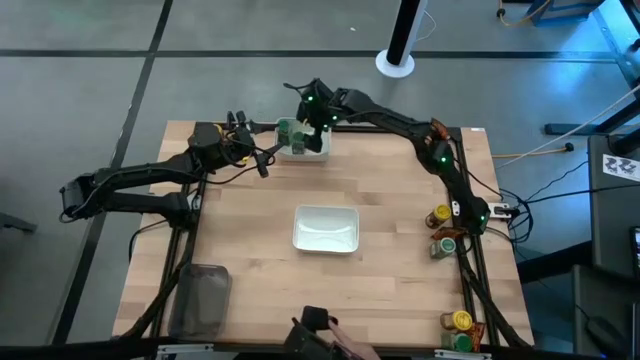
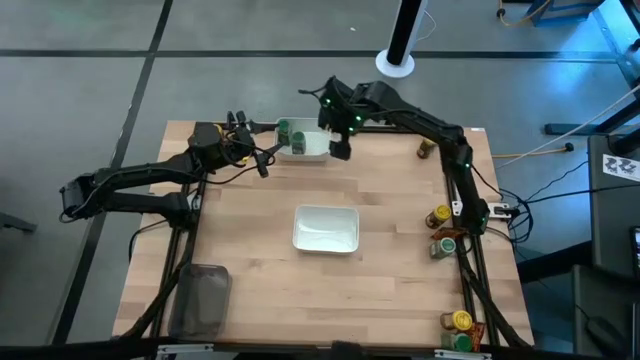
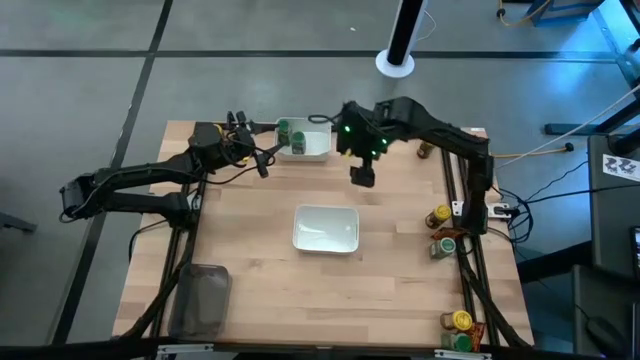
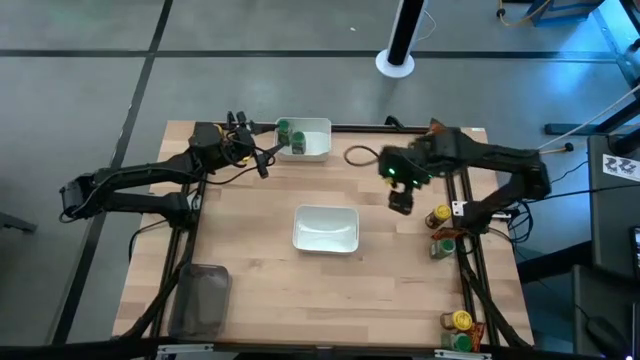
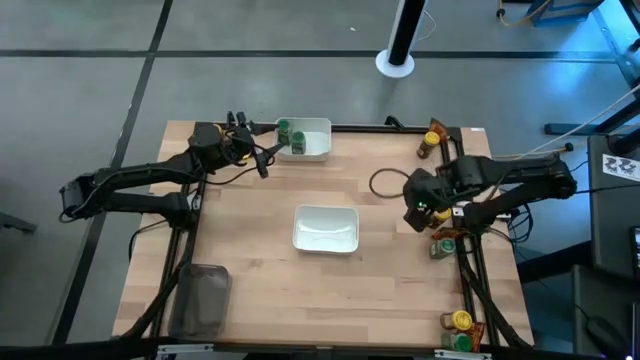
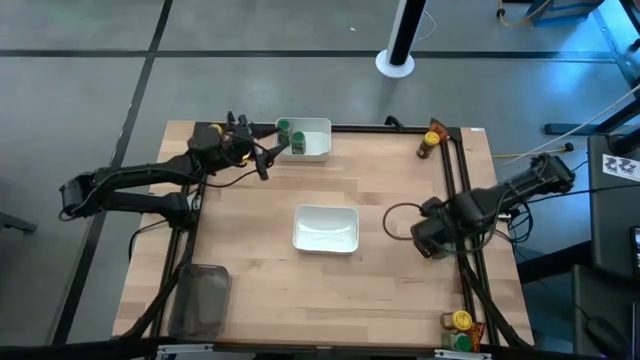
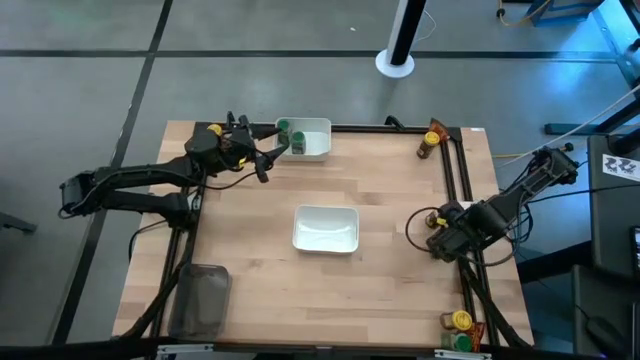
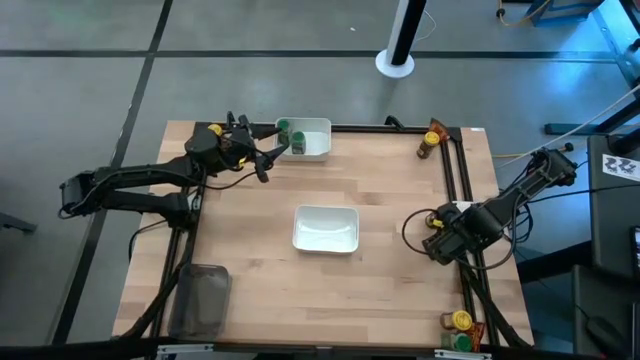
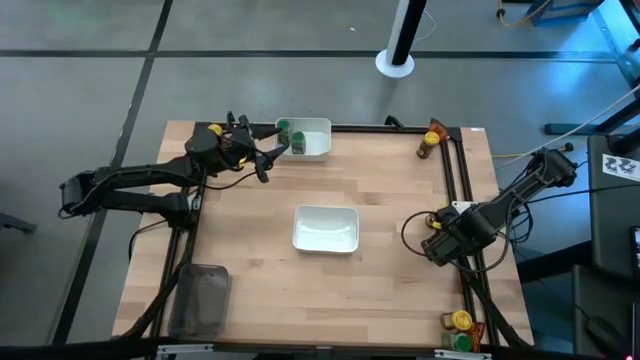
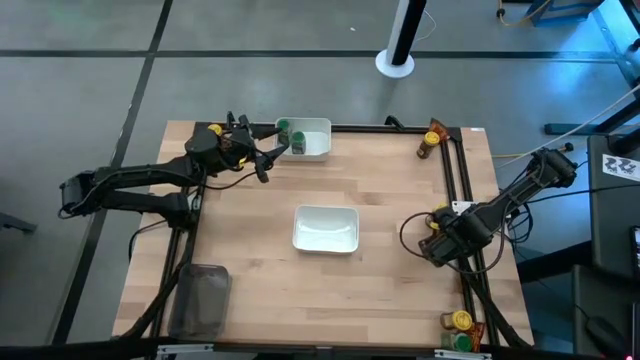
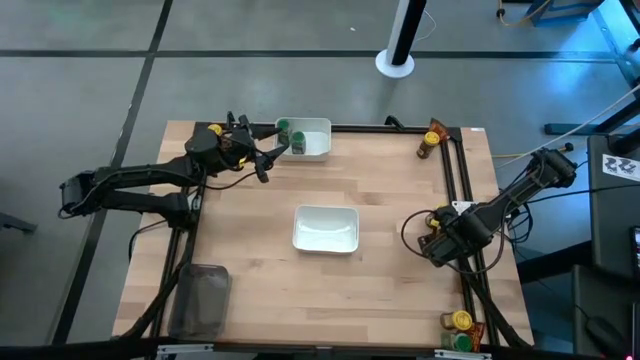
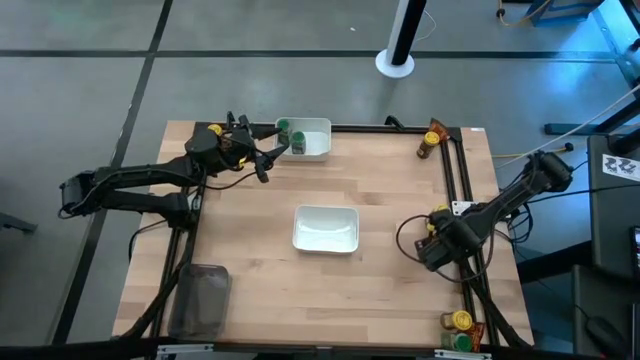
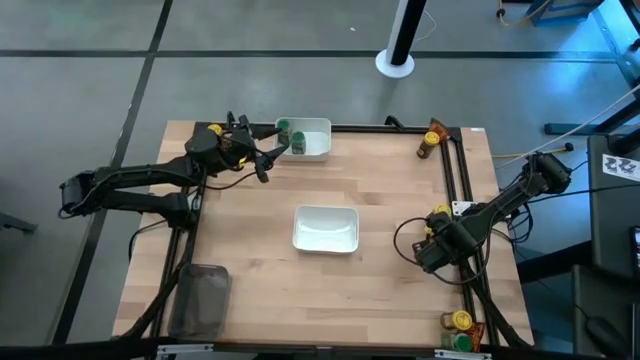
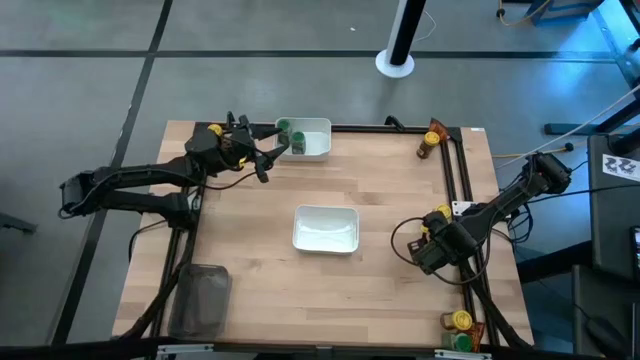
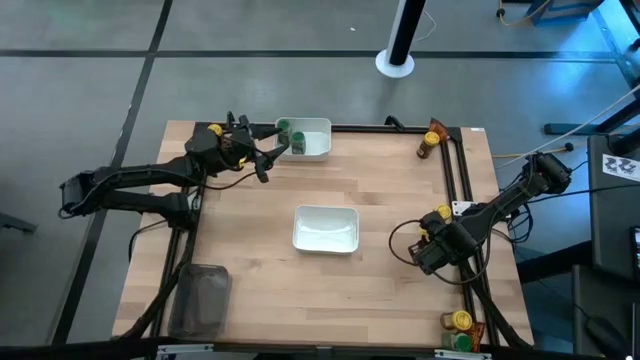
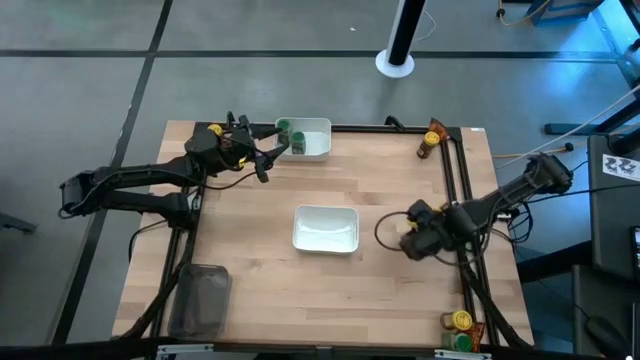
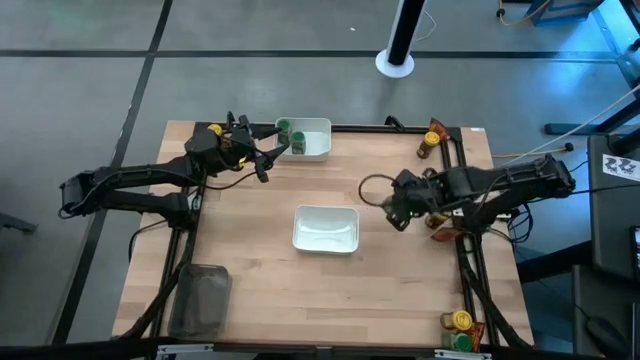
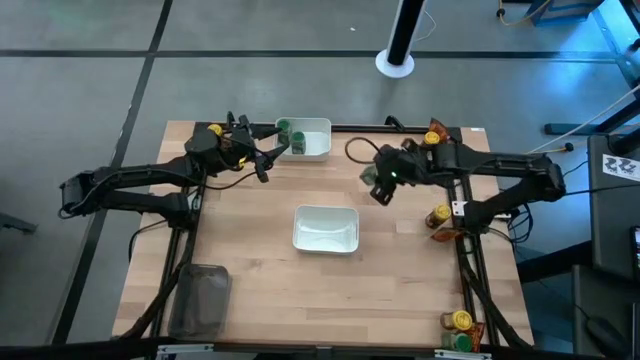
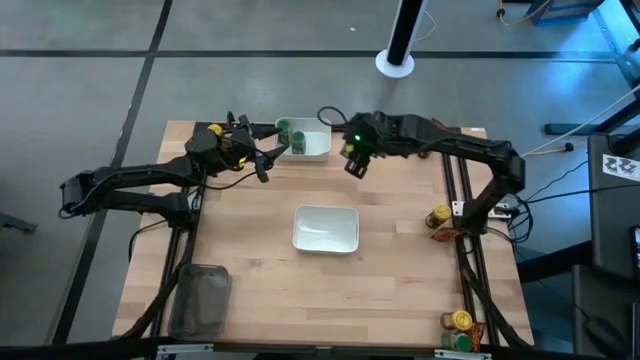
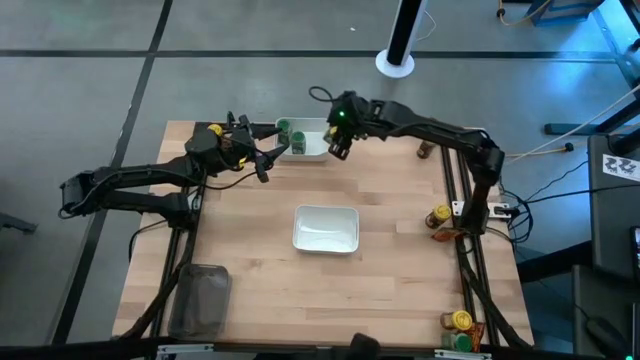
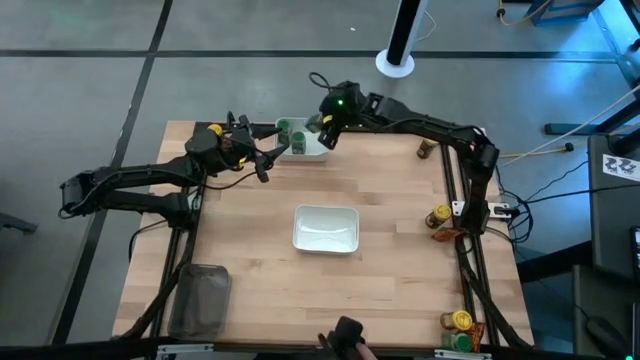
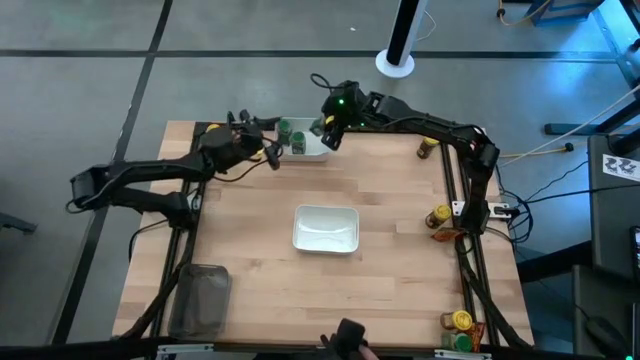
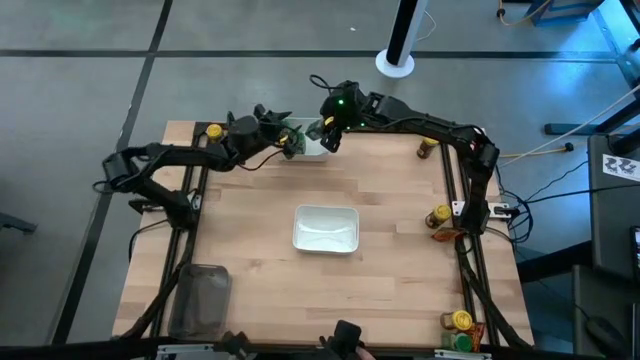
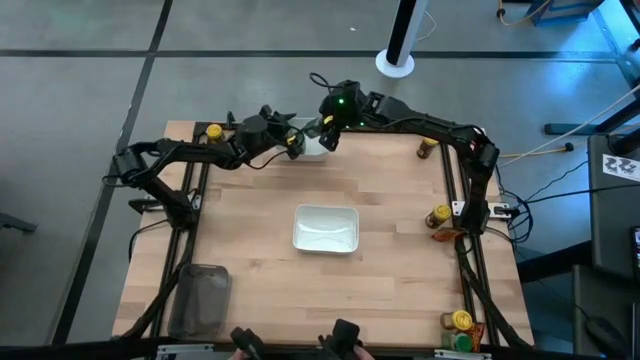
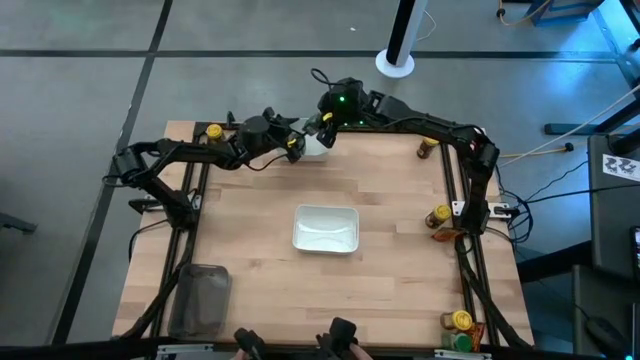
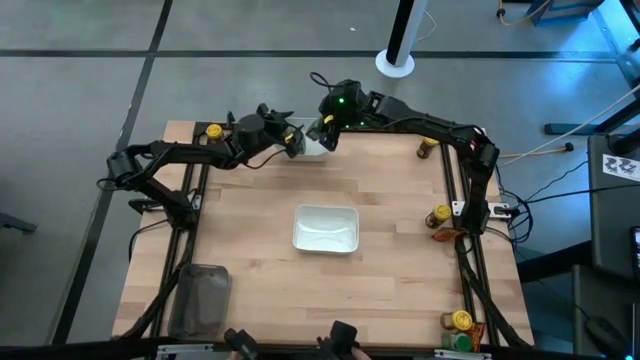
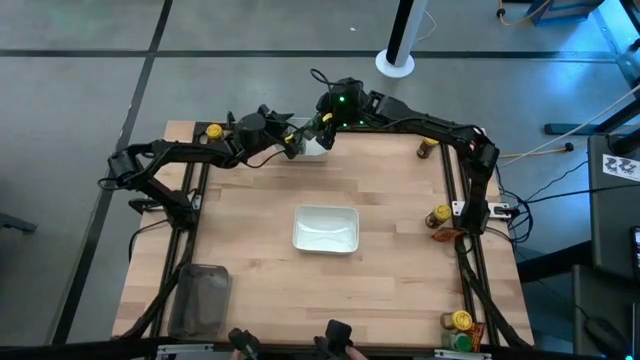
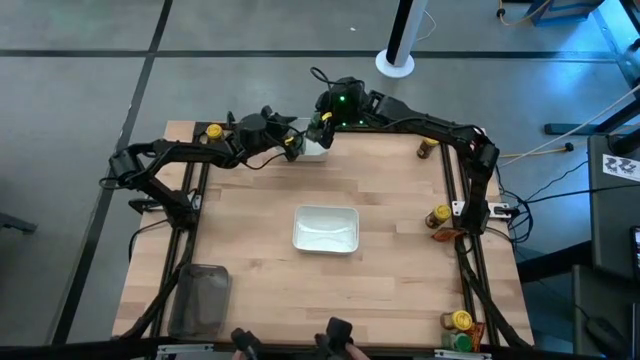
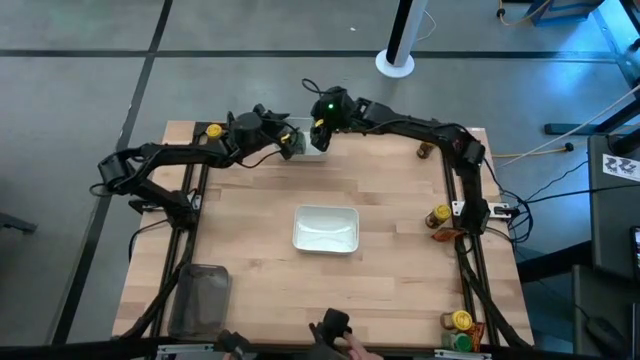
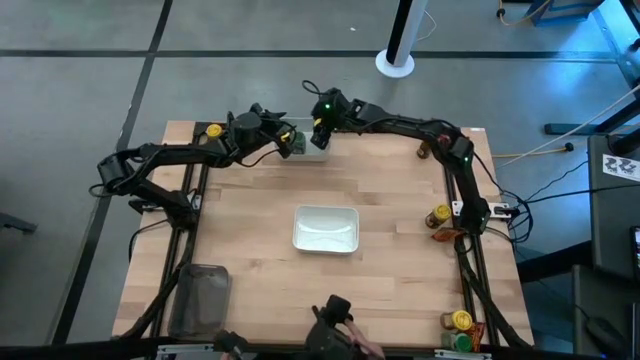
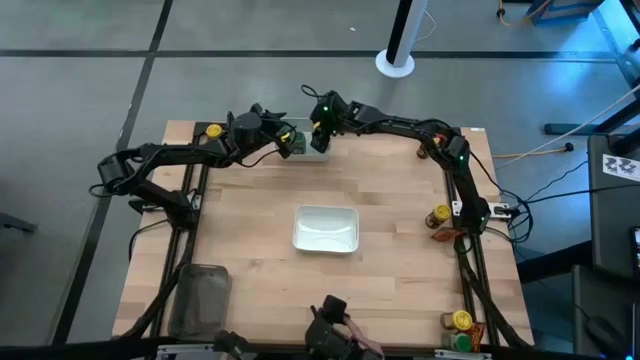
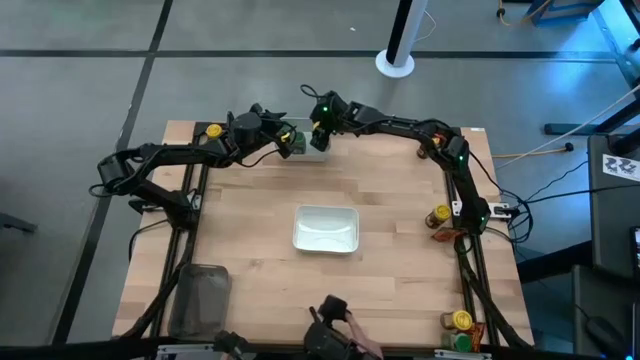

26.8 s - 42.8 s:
Task: Sort spices by type
Put the top green seasoning bottle into the top white bin

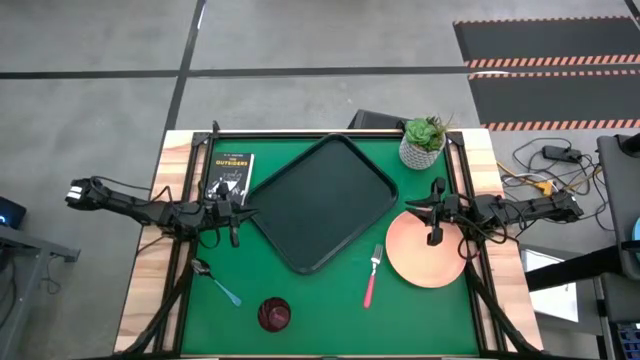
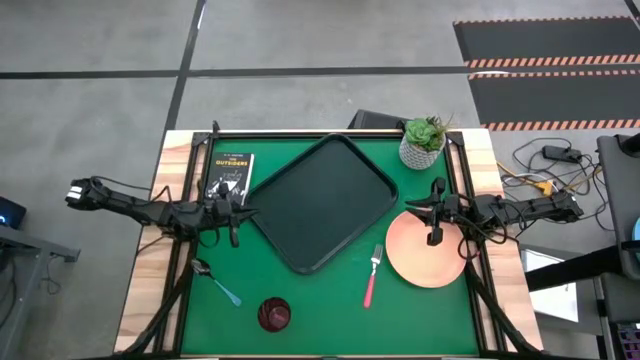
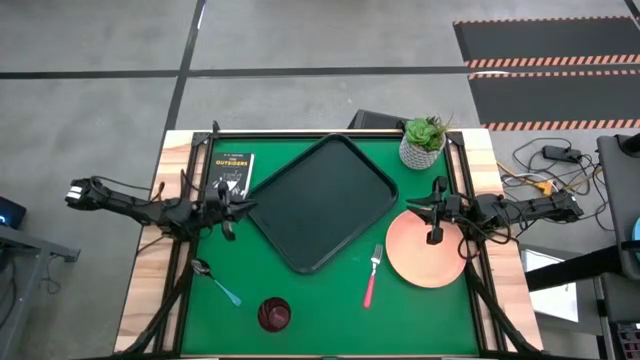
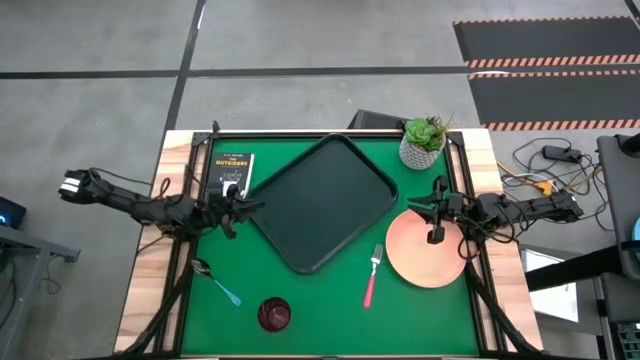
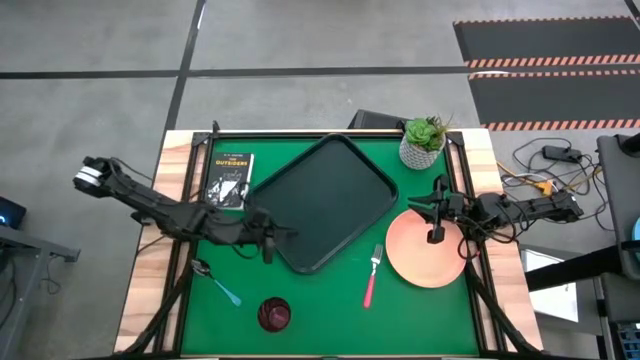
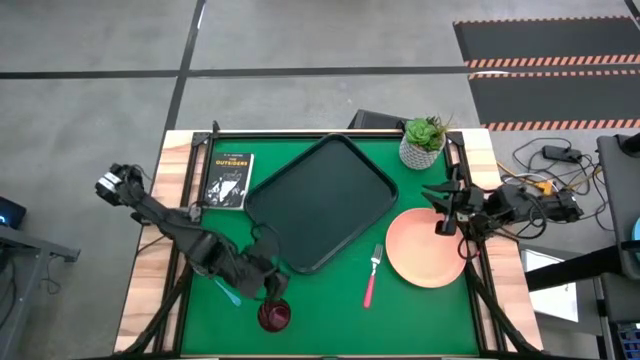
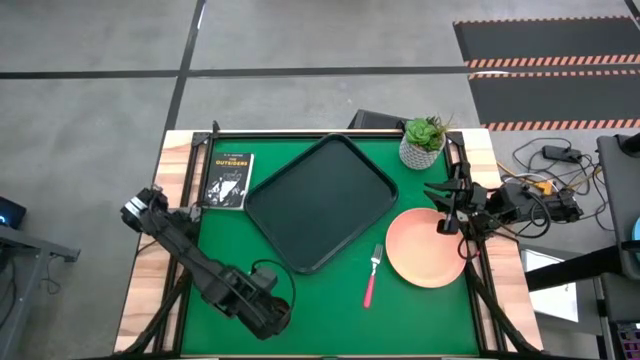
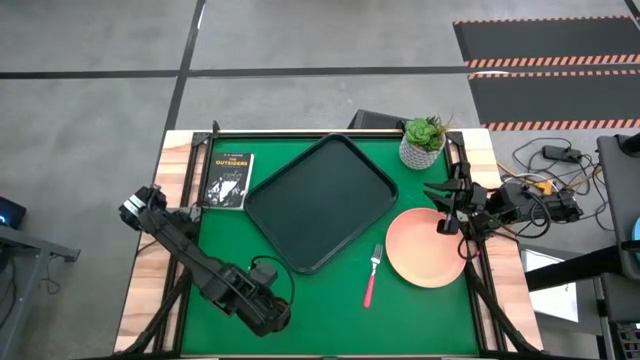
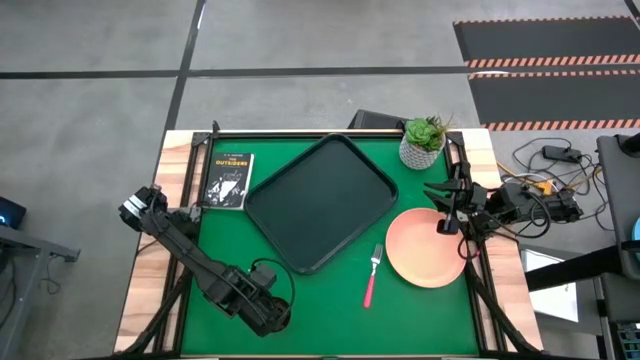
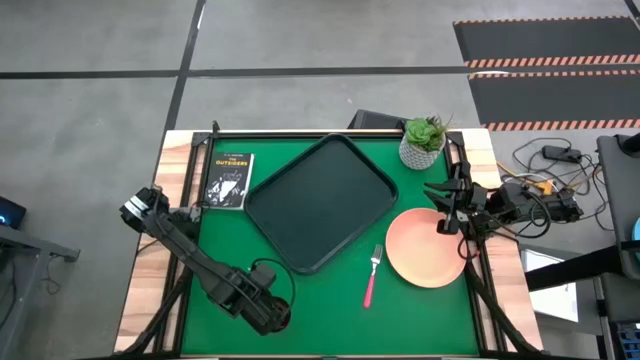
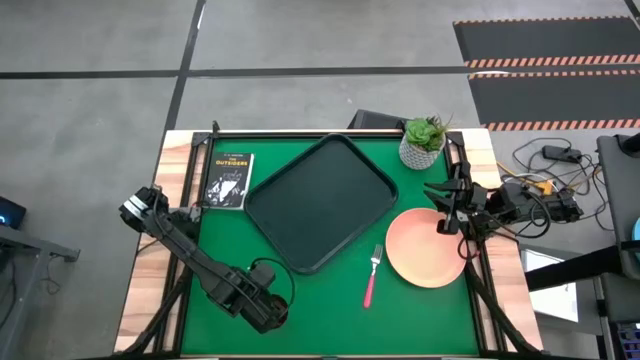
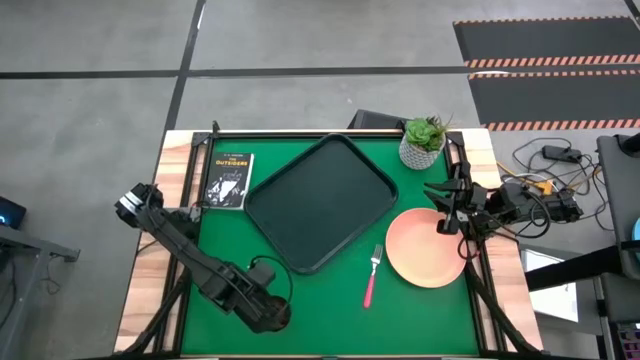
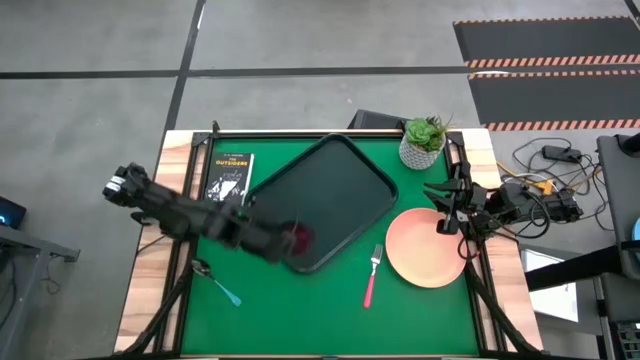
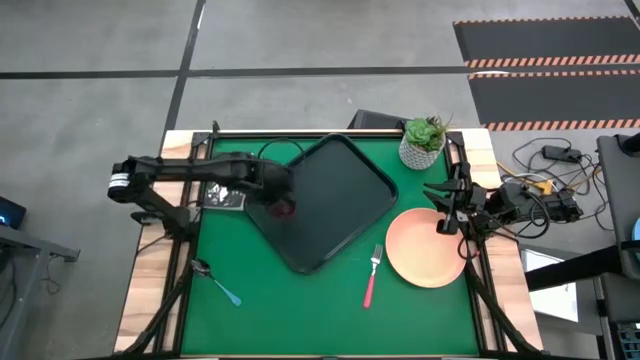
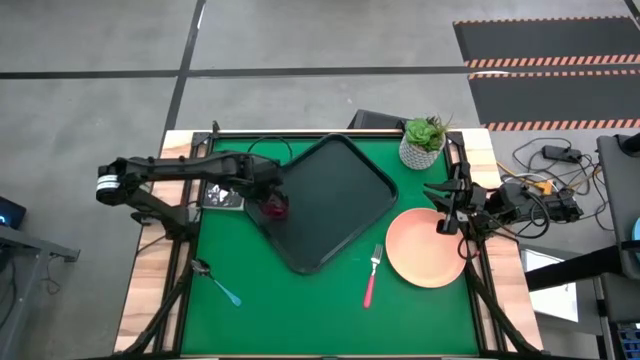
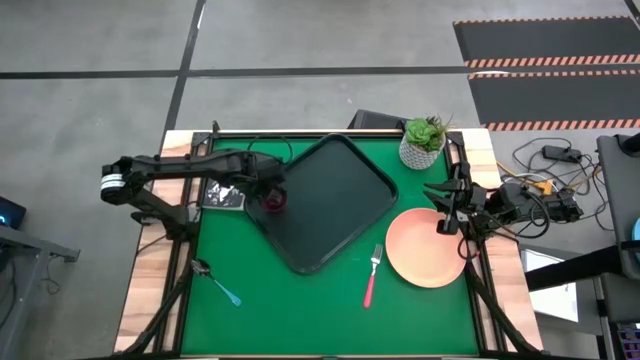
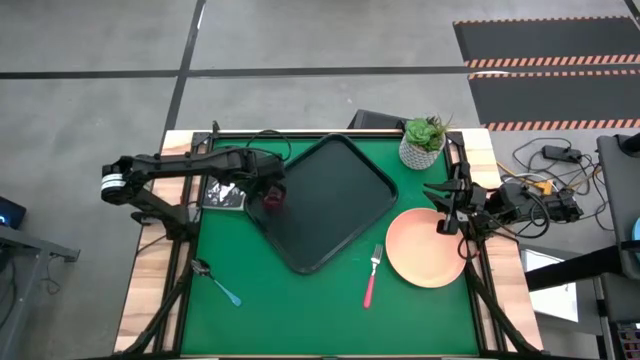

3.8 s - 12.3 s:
Task: Pick and place plate/cup/fork/spoon on tray
Put the red glass on the top left of the black serving tray
